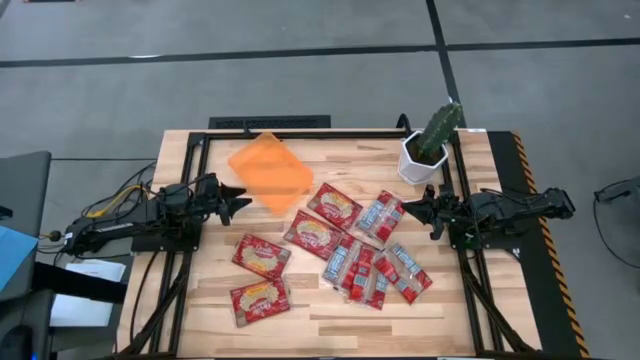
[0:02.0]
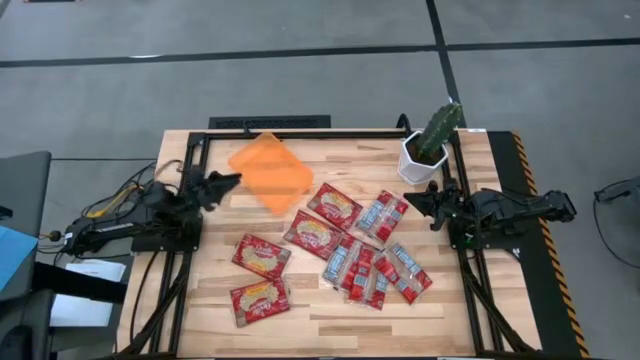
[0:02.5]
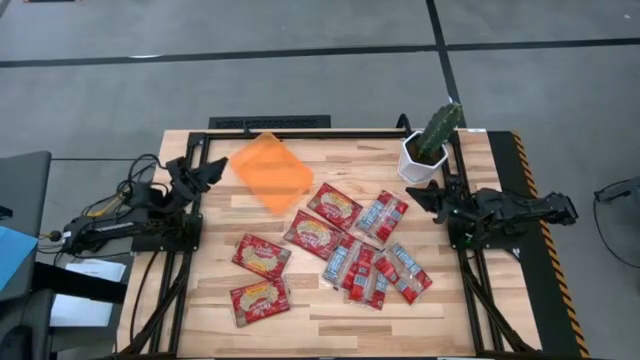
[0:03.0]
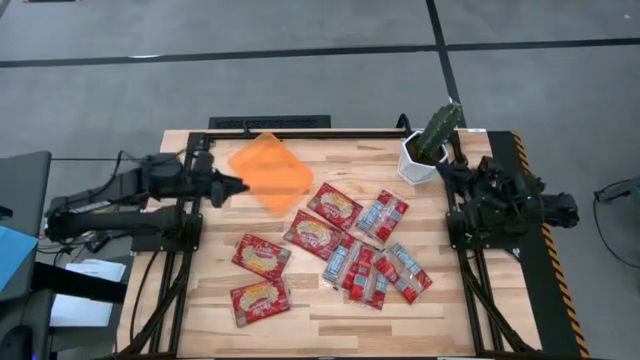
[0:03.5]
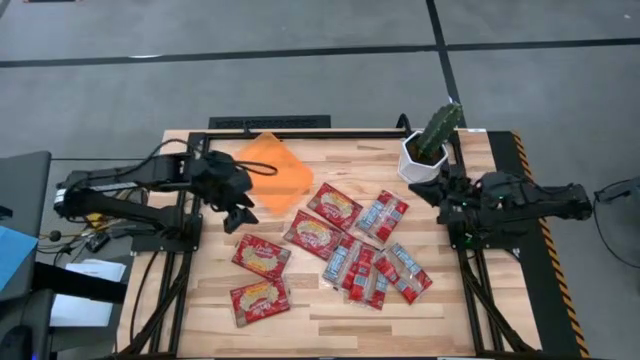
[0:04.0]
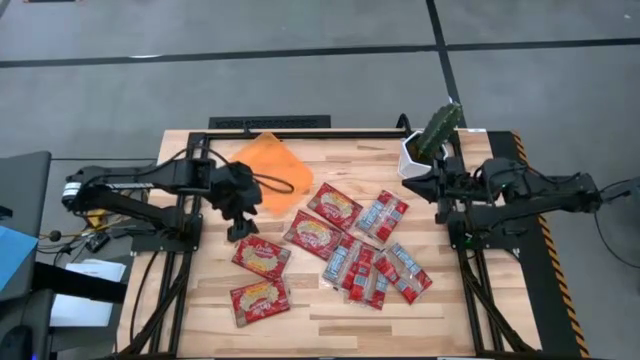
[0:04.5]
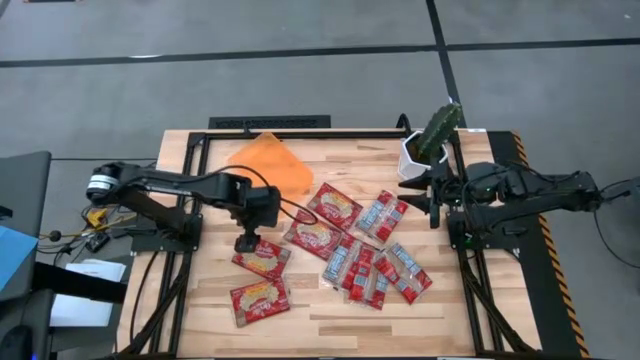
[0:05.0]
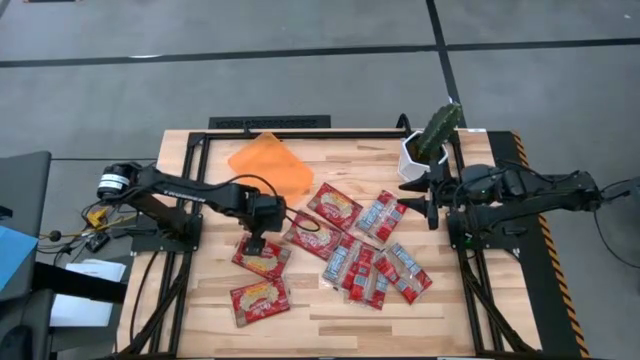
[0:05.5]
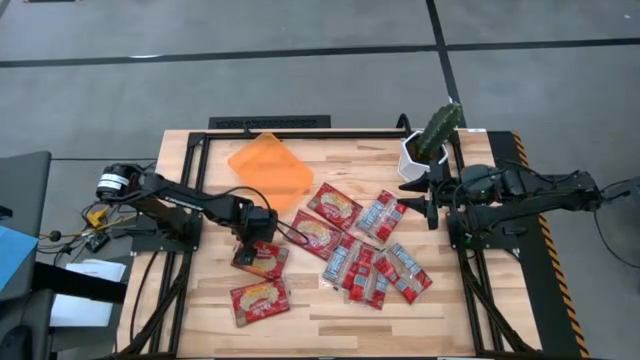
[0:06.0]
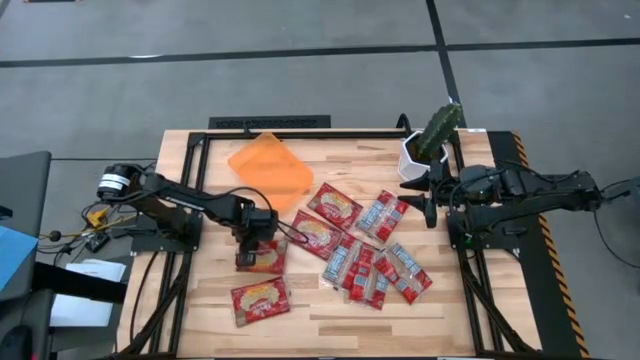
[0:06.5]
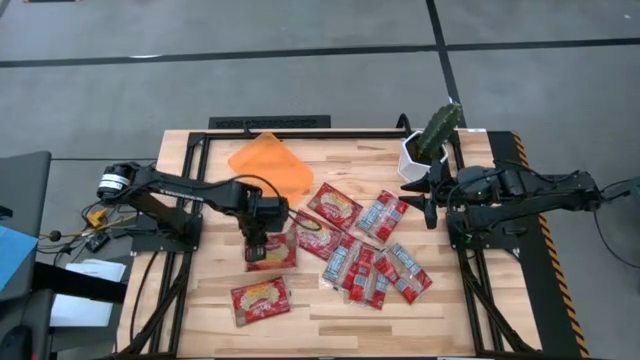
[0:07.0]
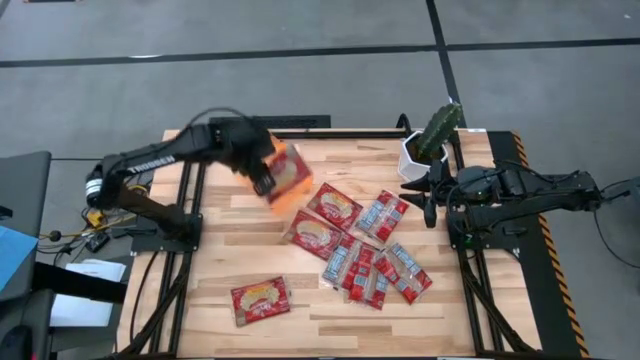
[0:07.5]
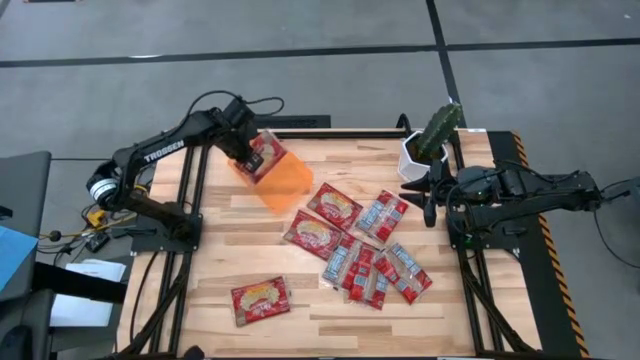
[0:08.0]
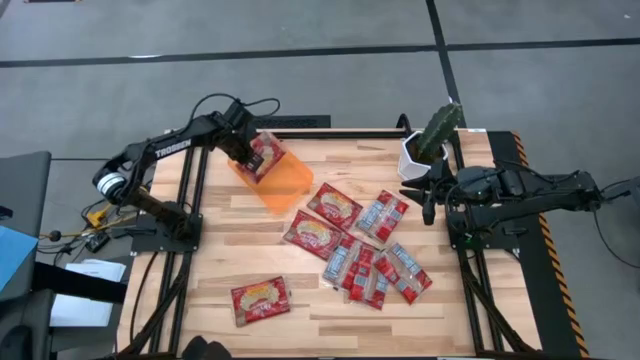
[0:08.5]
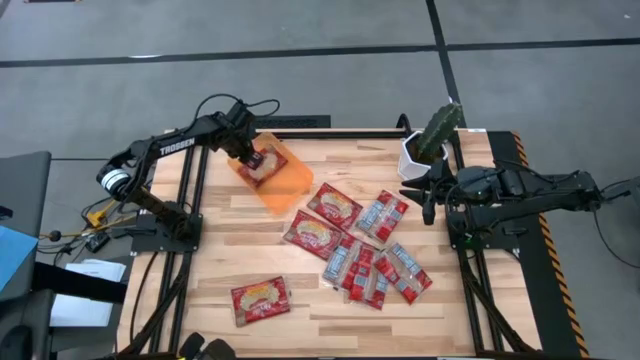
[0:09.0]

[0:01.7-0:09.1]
Task: Sort popcorn bags into baskets
Put the red popcorn bag into the orange bin

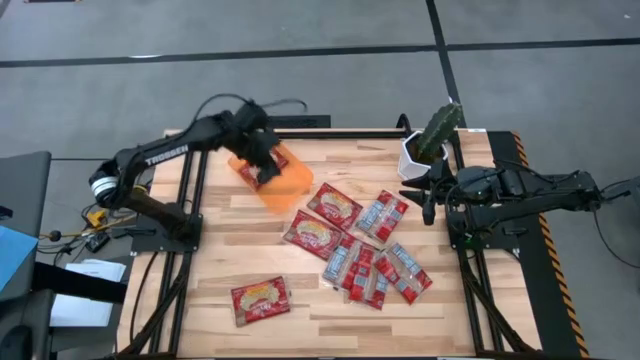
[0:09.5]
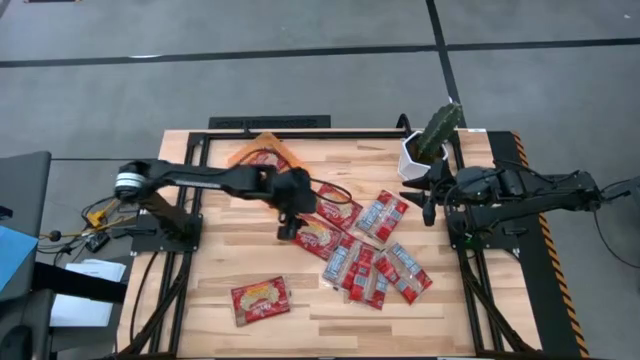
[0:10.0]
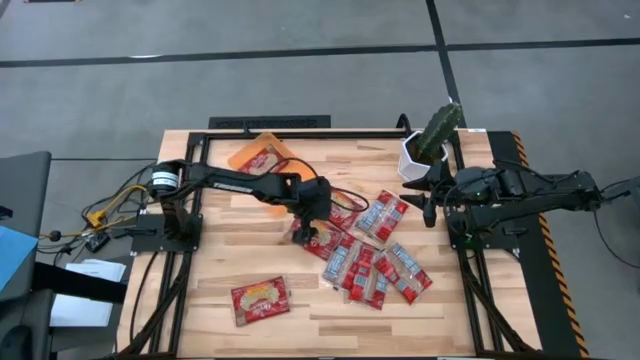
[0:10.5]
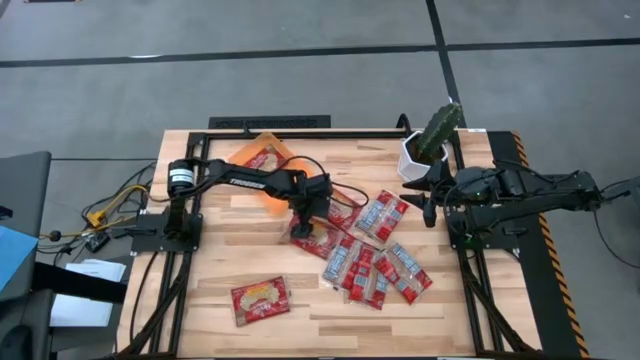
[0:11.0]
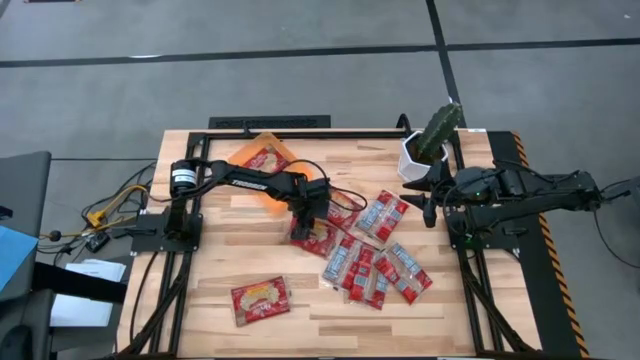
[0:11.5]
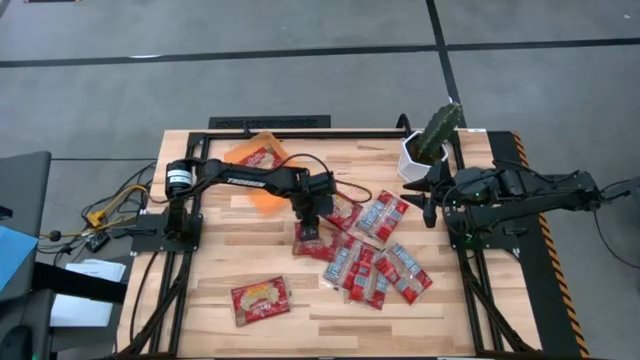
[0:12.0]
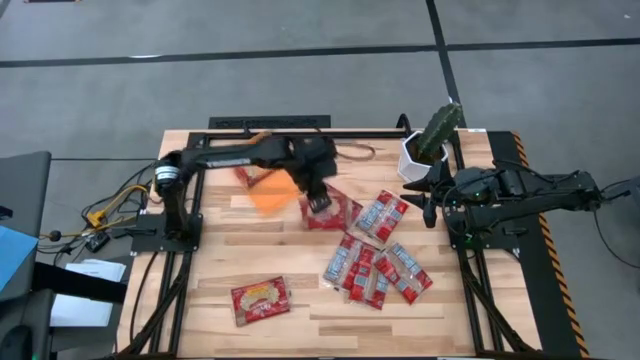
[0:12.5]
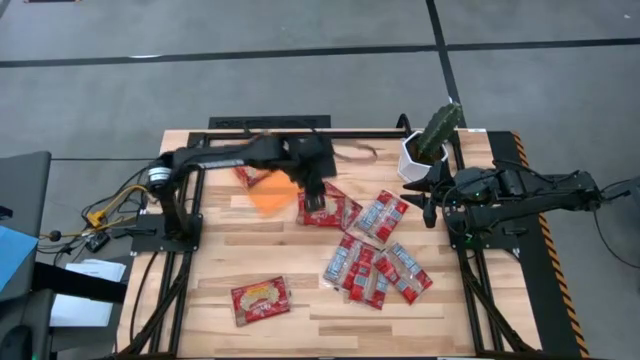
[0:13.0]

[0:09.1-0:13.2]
Put the red popcorn bag into the orange bin

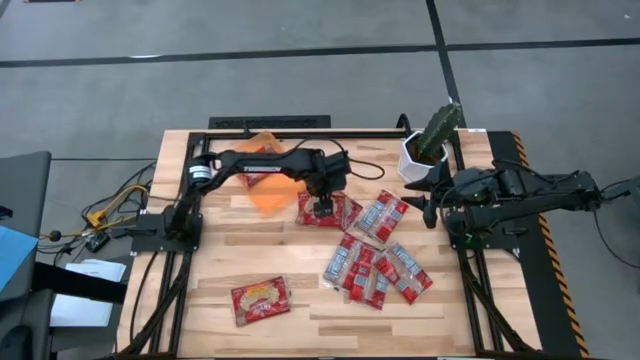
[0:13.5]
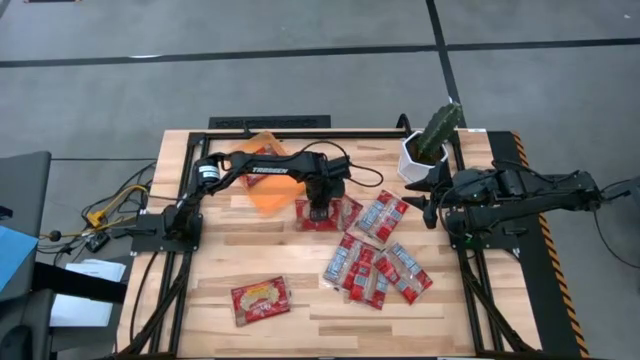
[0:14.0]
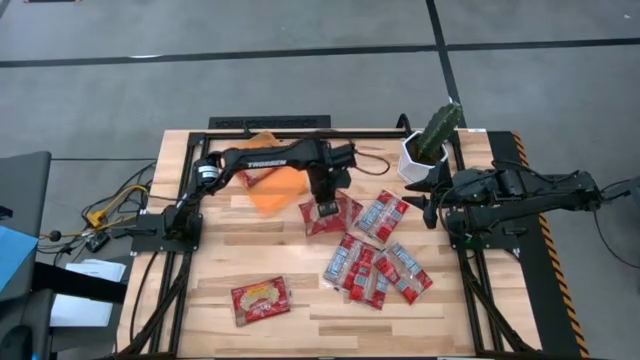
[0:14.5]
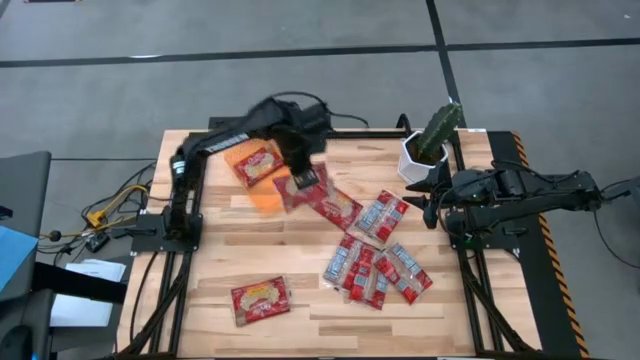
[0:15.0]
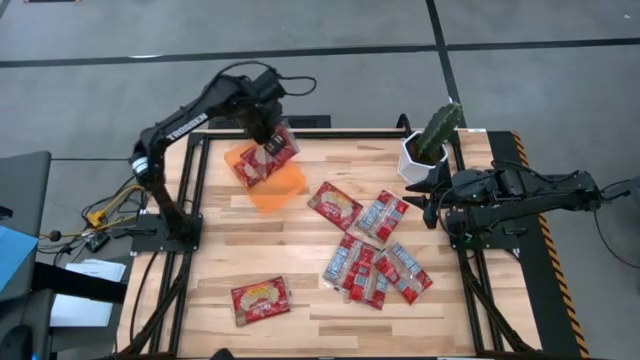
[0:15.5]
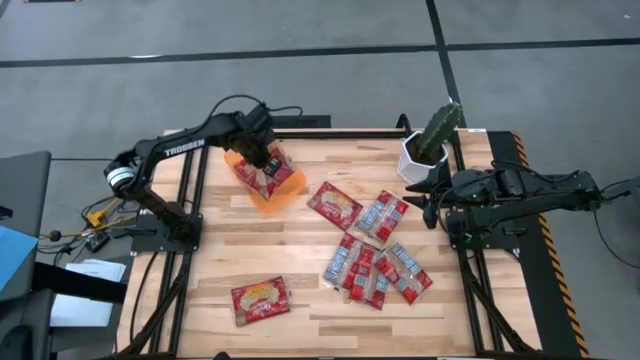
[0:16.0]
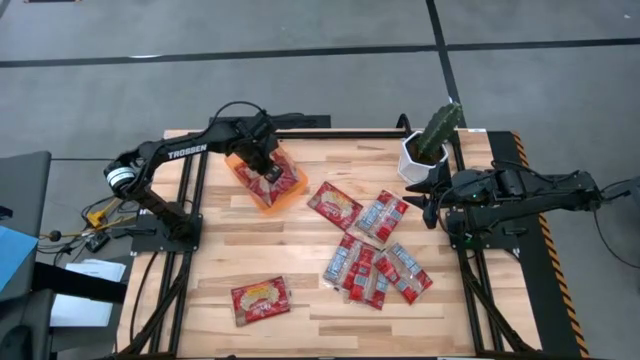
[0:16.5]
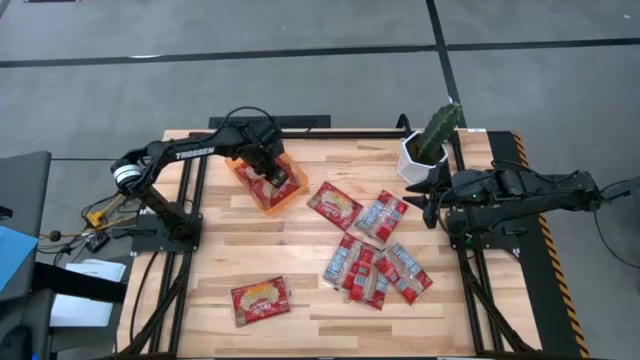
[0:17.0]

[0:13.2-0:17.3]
Put the red popcorn bag into the orange bin

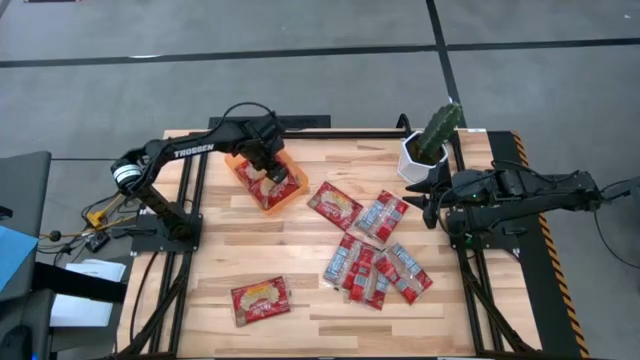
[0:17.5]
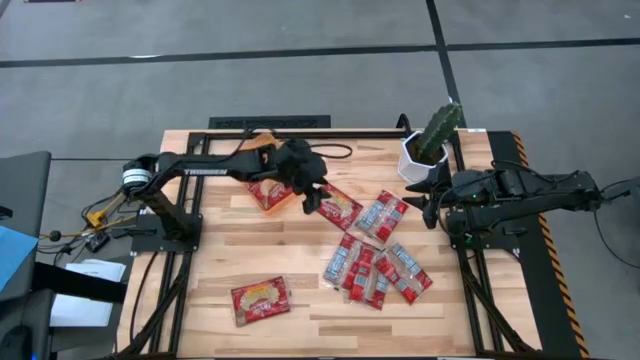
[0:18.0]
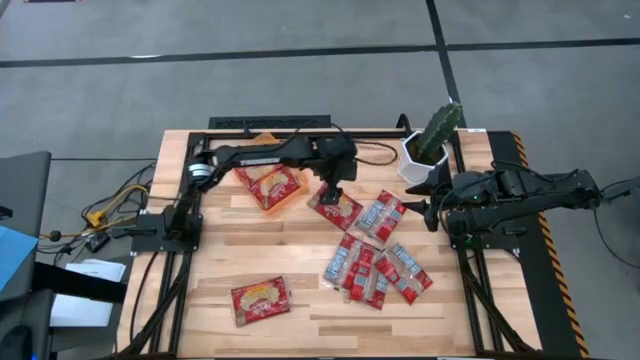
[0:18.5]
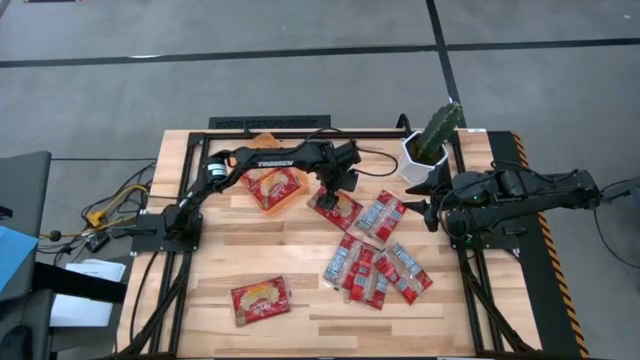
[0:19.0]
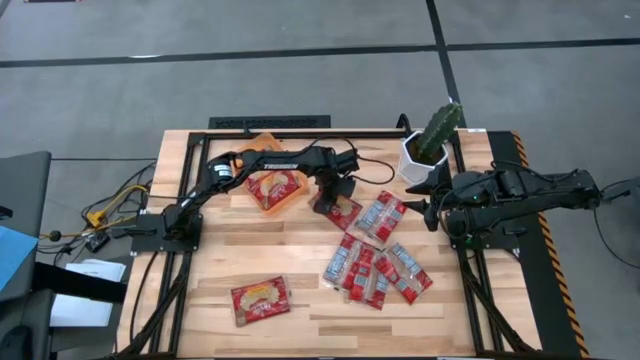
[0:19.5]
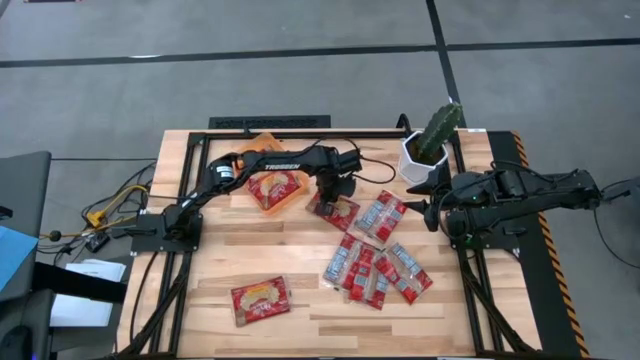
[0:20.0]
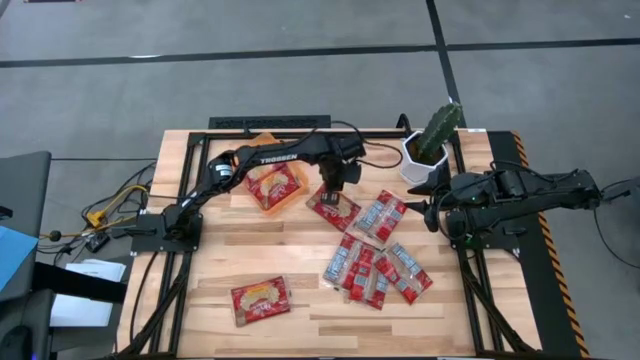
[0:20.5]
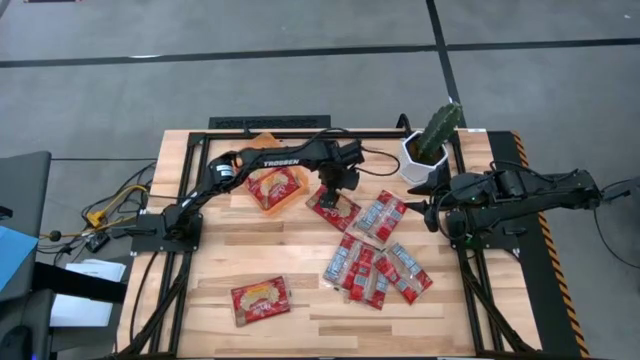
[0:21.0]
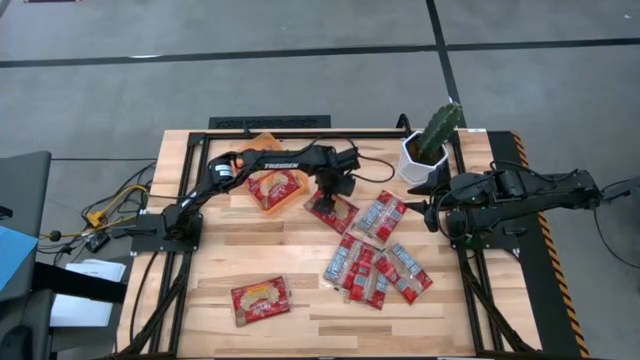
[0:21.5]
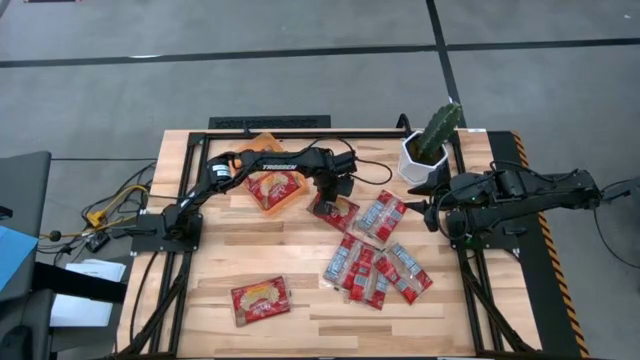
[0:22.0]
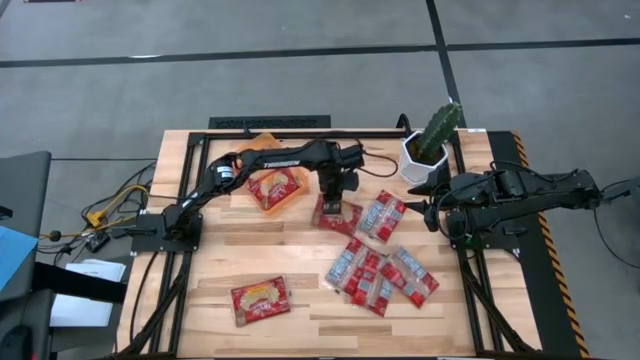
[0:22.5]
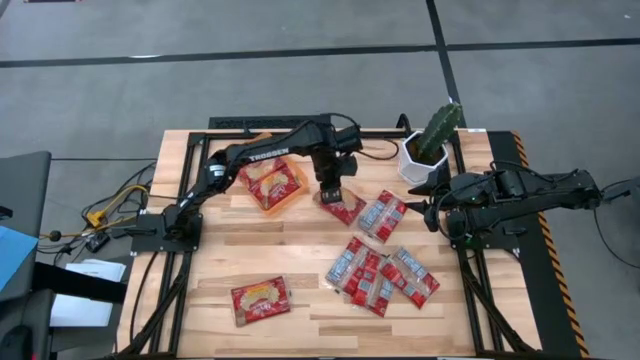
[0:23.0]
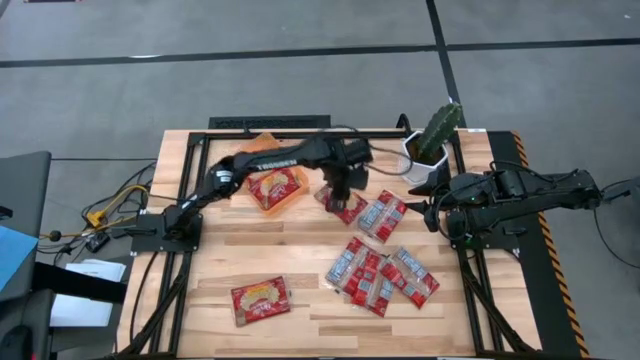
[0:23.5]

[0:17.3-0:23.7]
Put the red popcorn bag into the orange bin
